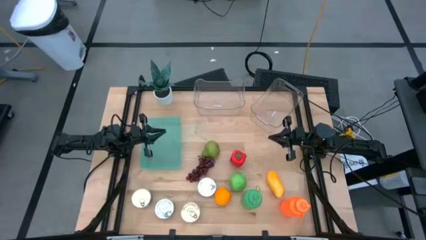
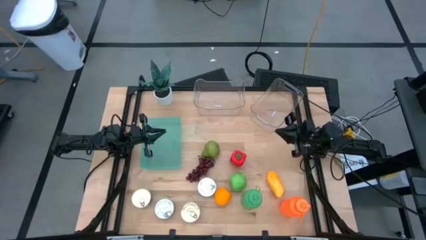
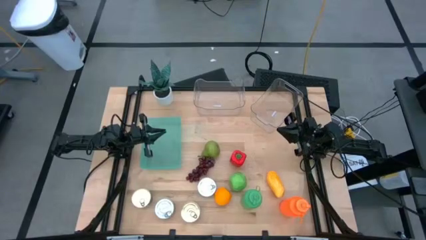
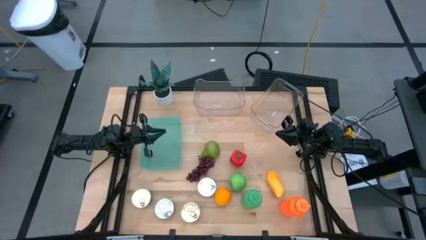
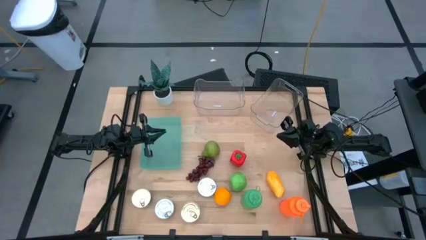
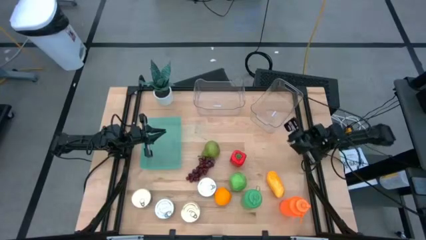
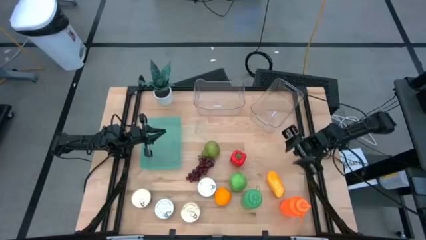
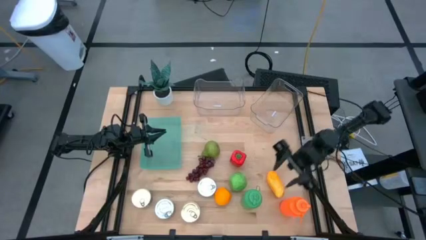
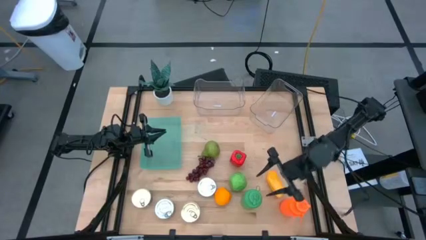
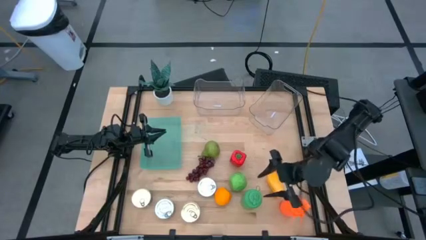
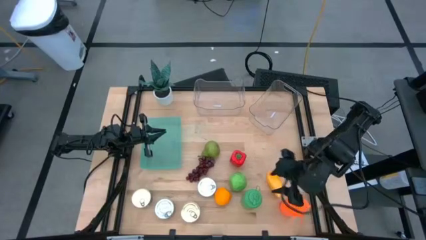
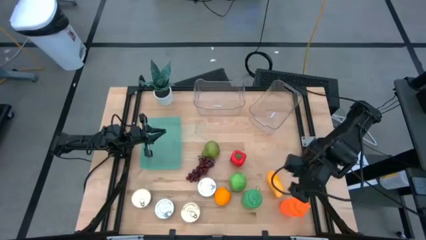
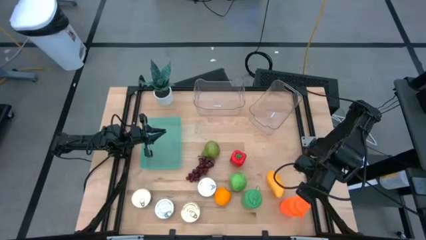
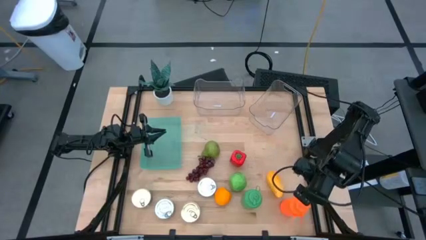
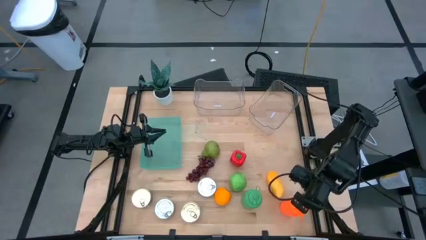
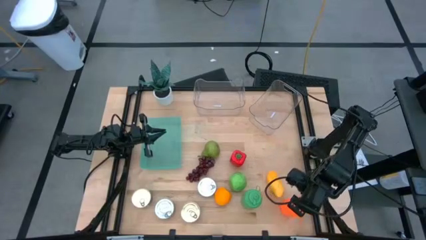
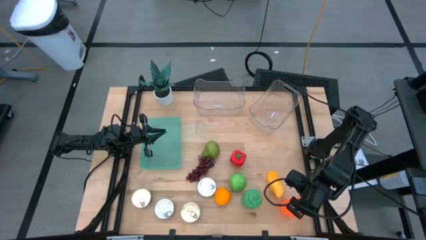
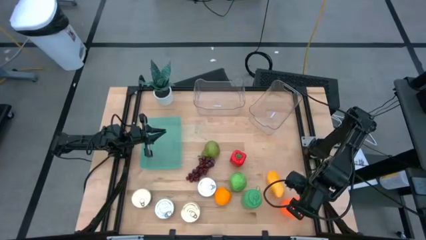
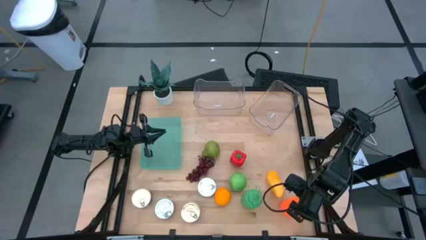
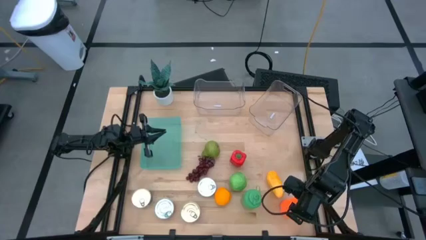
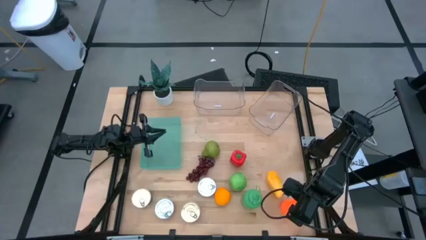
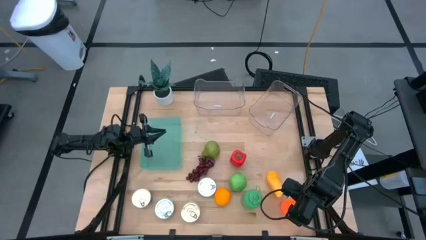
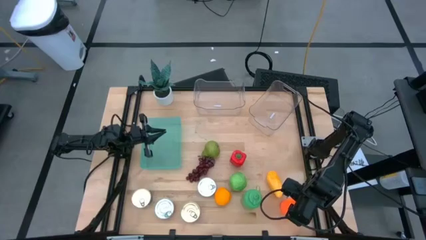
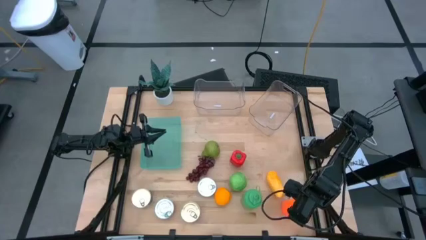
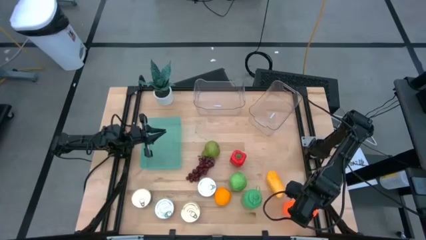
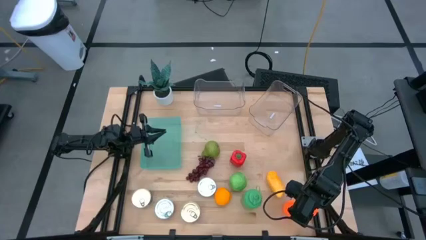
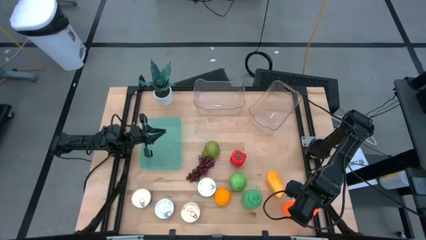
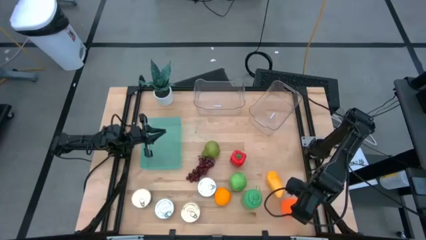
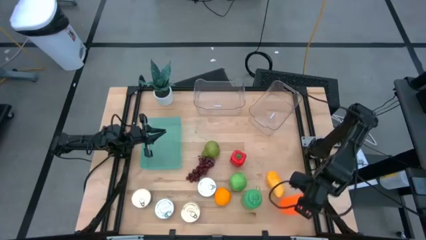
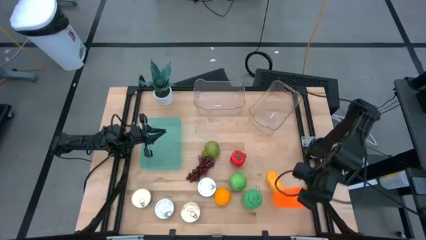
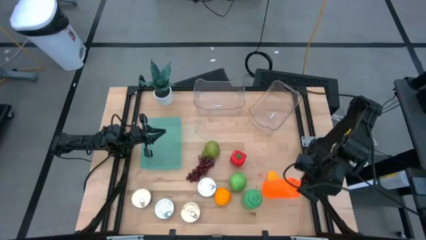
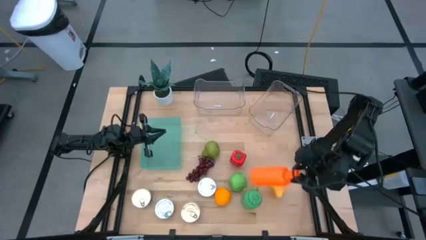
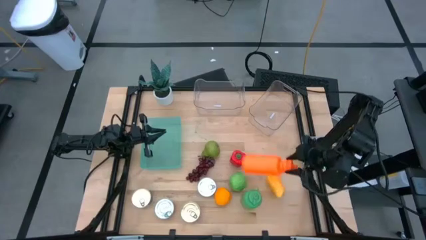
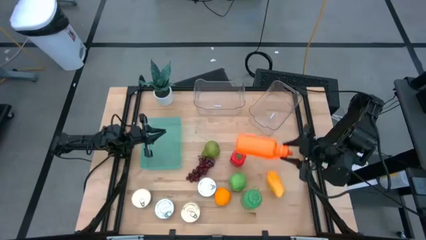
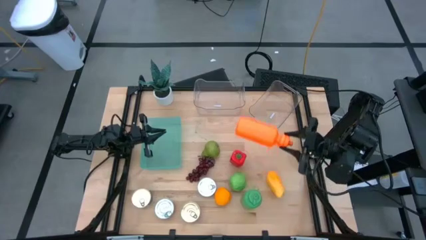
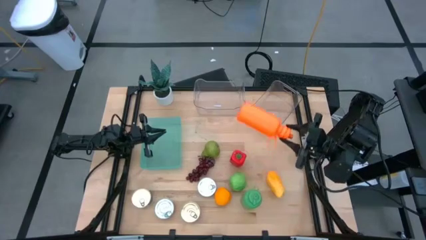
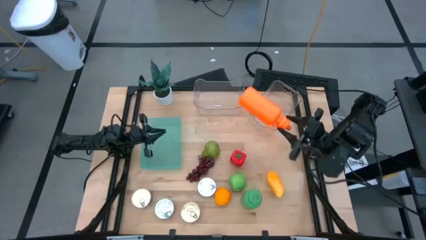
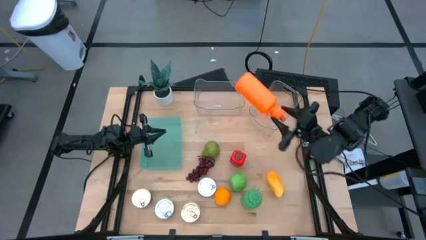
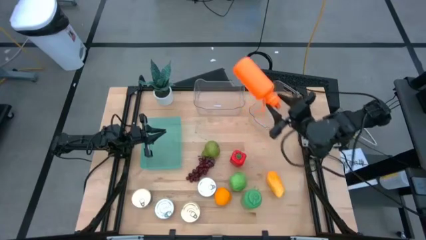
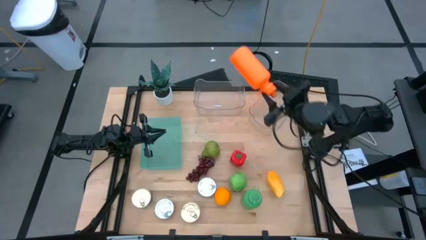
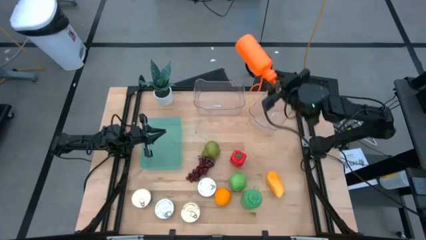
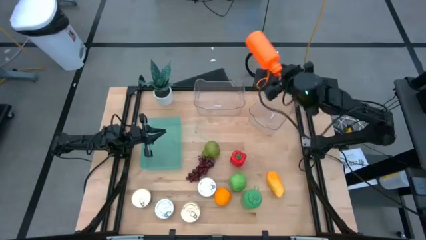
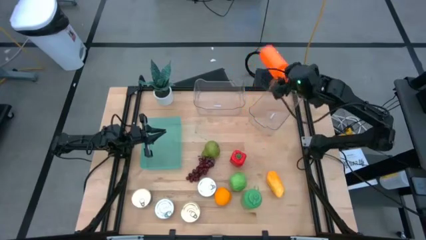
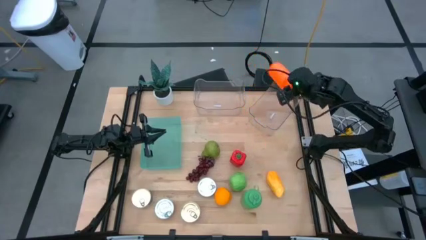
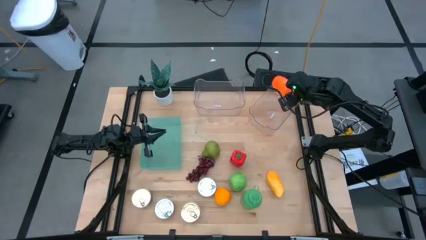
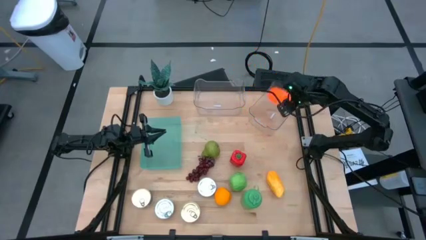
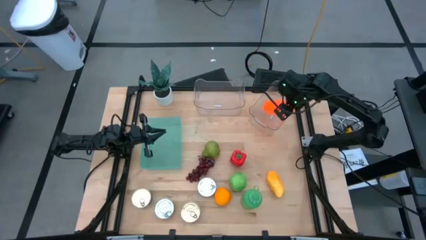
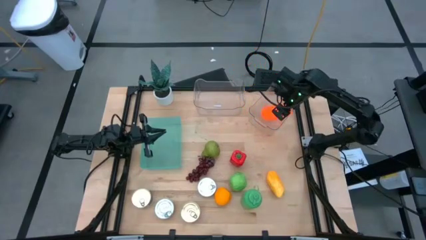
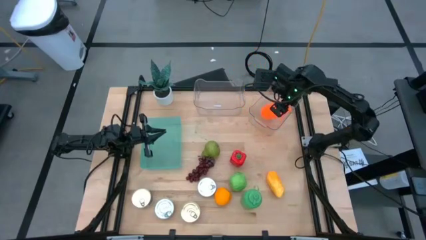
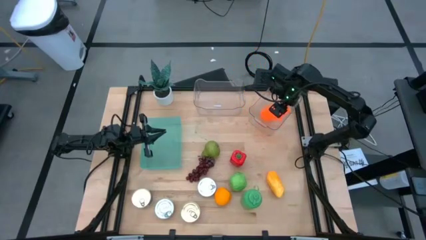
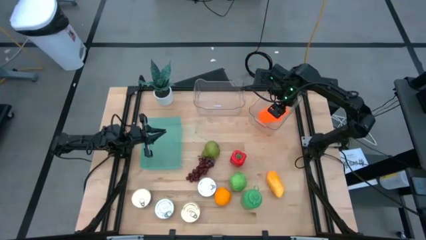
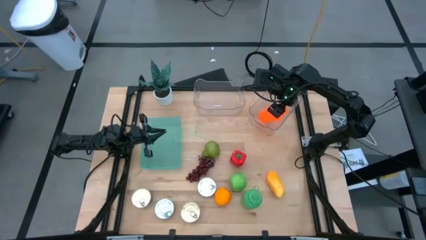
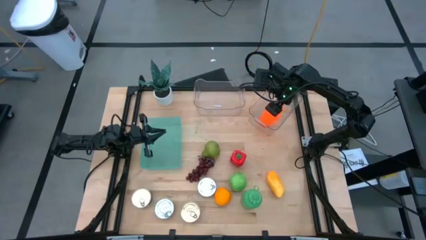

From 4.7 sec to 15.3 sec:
Task: Pick & Place Food Item
Put the orange tumbler into the right transparent bin
